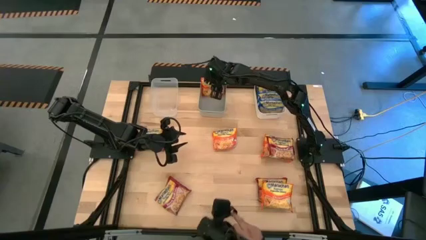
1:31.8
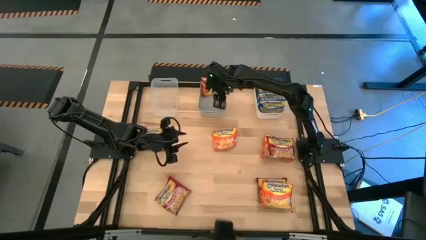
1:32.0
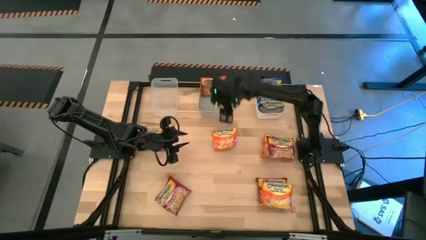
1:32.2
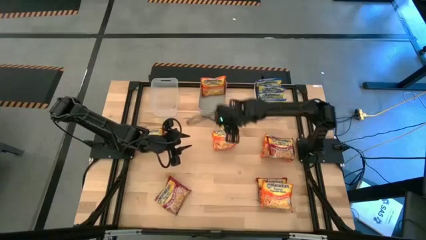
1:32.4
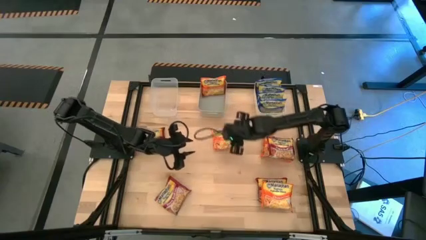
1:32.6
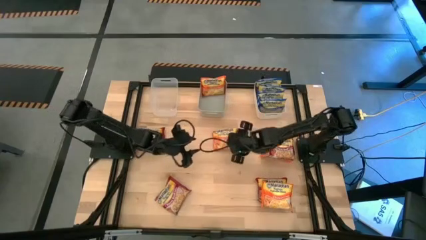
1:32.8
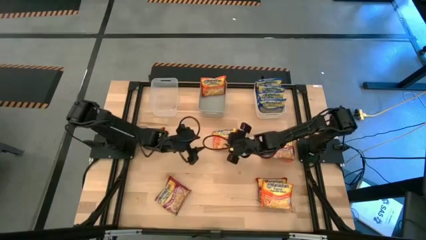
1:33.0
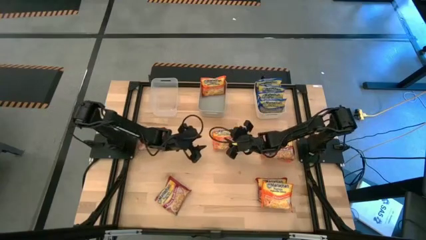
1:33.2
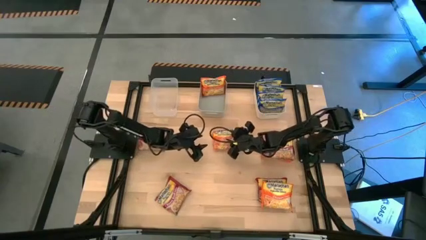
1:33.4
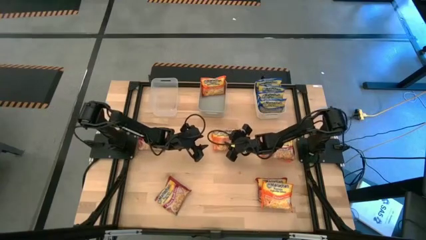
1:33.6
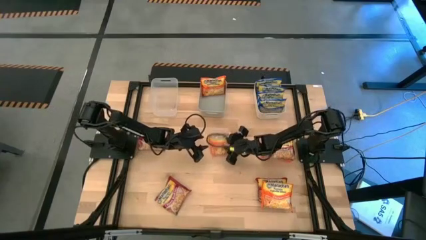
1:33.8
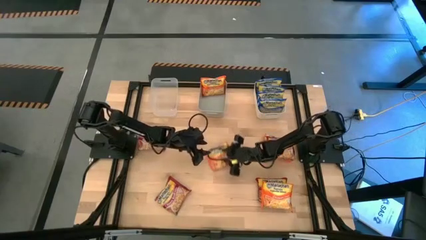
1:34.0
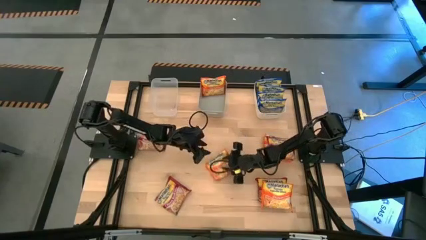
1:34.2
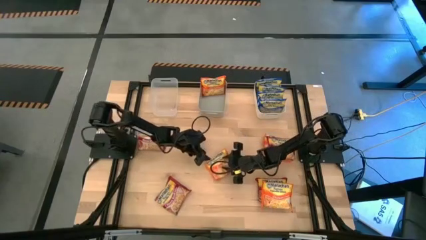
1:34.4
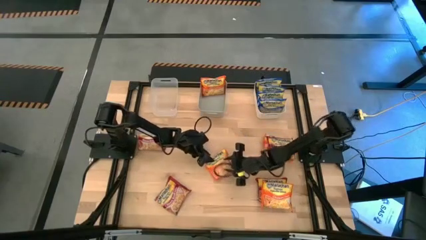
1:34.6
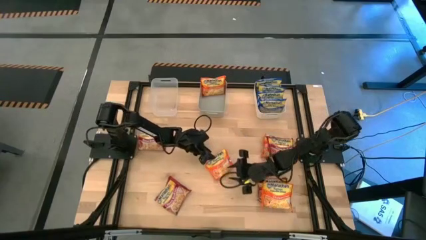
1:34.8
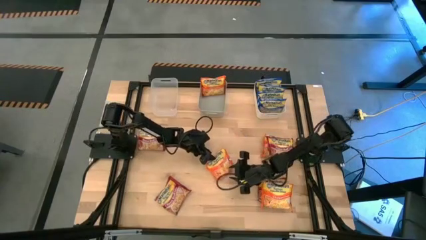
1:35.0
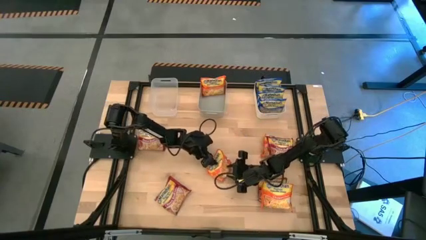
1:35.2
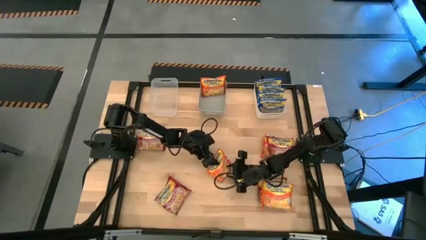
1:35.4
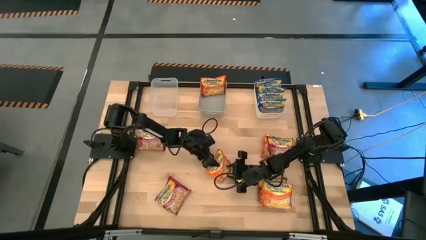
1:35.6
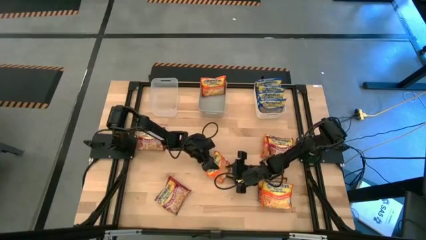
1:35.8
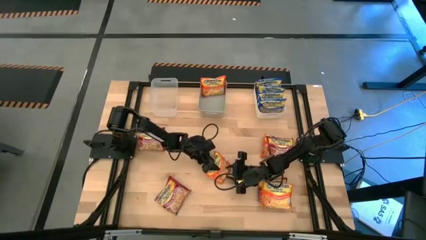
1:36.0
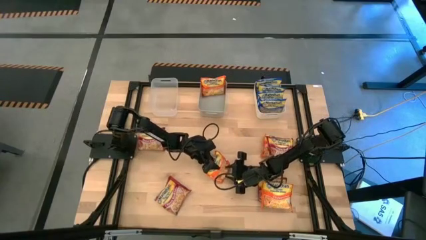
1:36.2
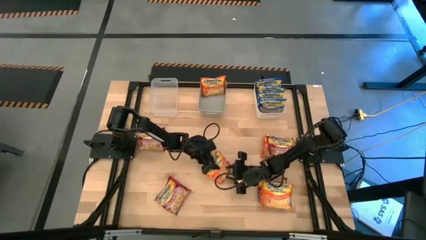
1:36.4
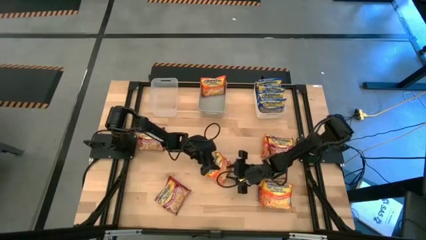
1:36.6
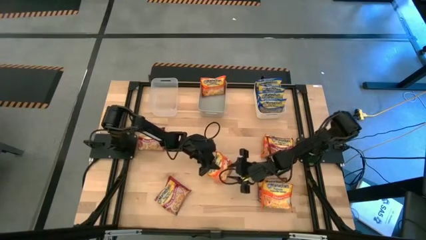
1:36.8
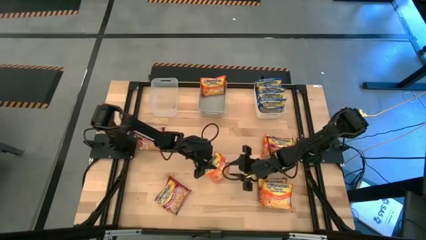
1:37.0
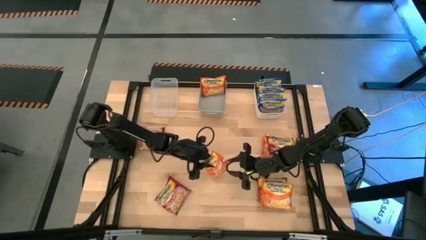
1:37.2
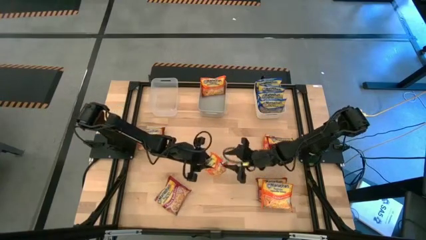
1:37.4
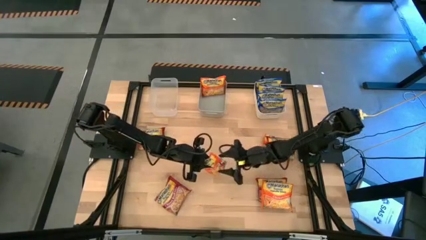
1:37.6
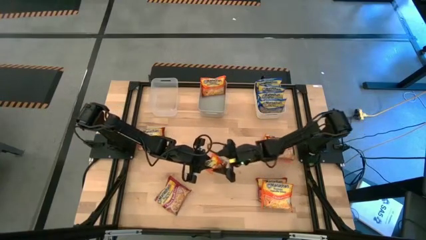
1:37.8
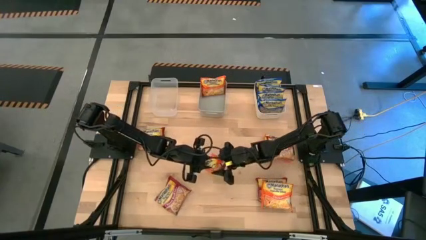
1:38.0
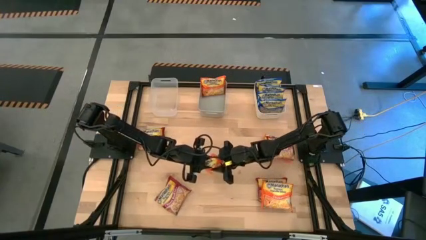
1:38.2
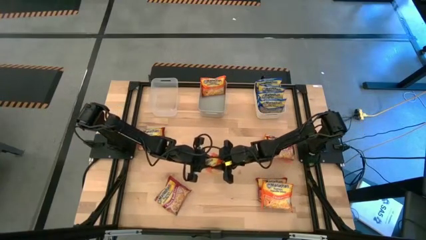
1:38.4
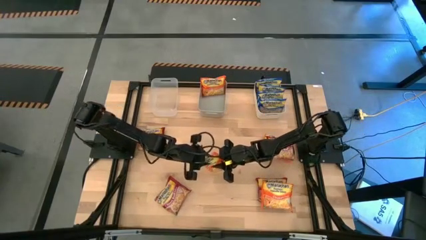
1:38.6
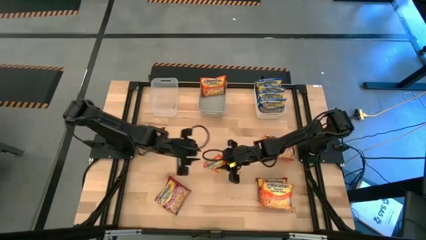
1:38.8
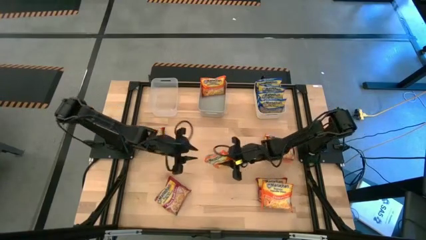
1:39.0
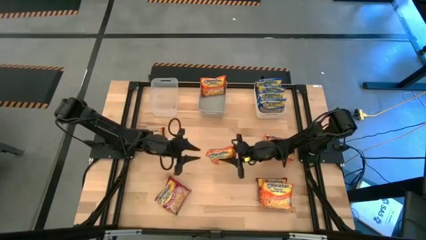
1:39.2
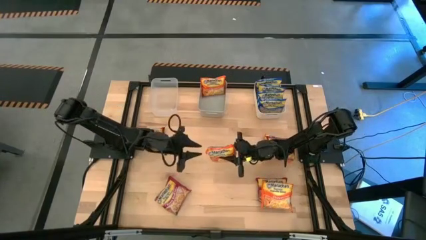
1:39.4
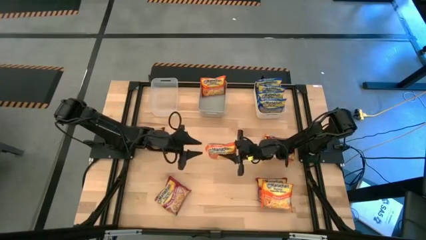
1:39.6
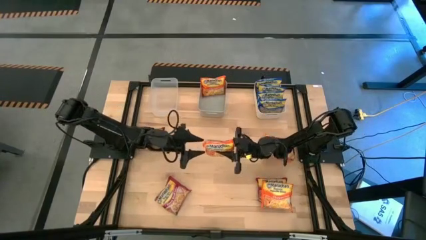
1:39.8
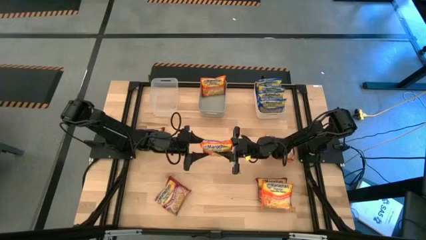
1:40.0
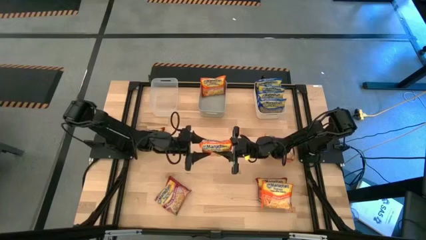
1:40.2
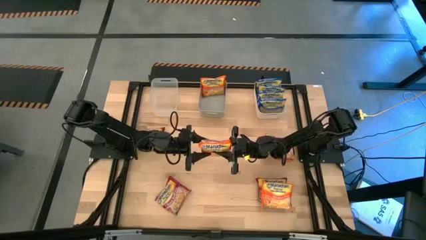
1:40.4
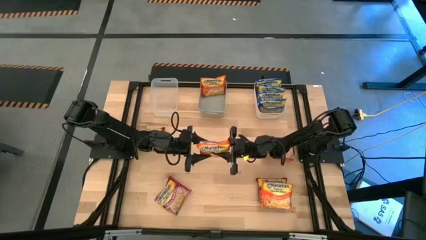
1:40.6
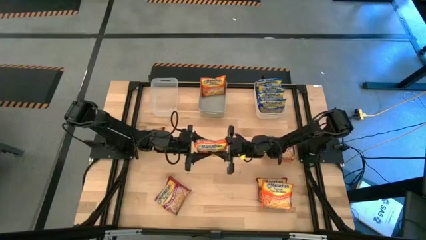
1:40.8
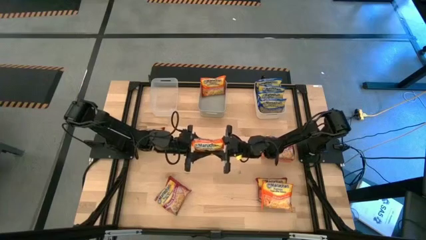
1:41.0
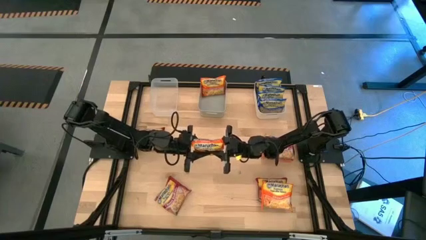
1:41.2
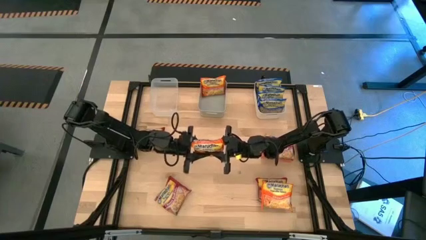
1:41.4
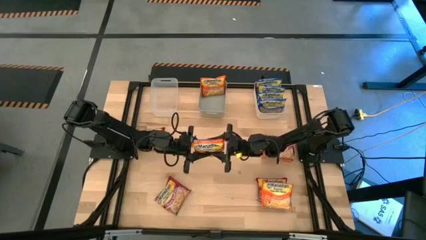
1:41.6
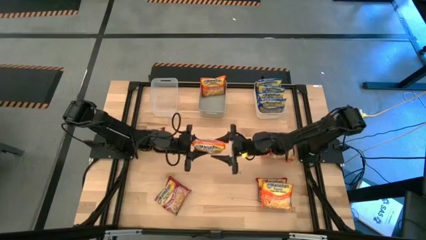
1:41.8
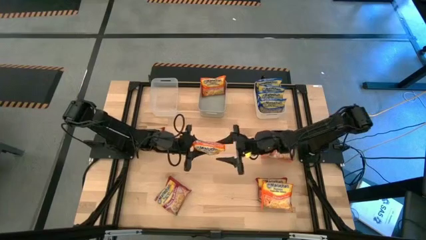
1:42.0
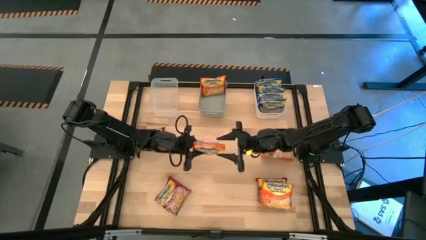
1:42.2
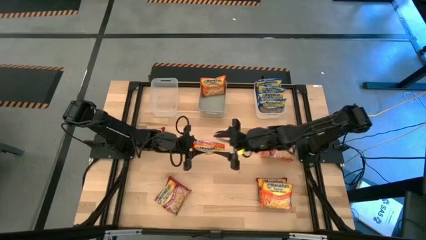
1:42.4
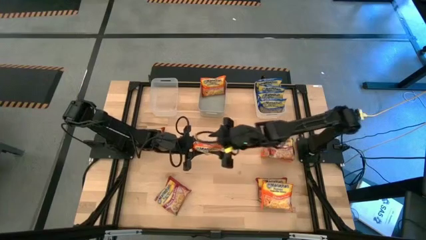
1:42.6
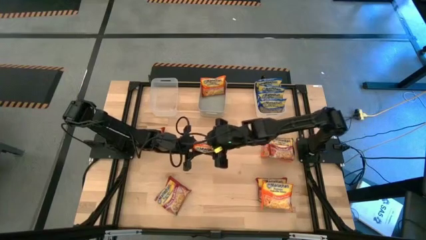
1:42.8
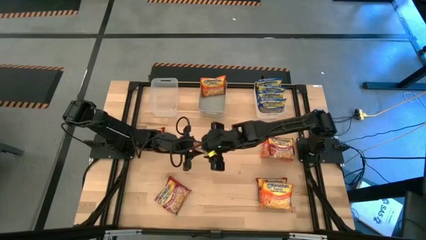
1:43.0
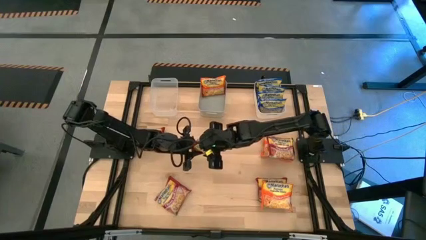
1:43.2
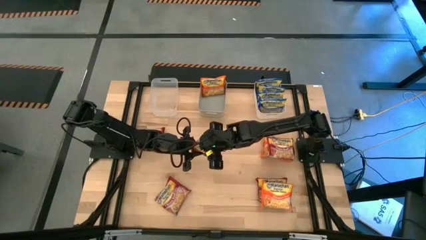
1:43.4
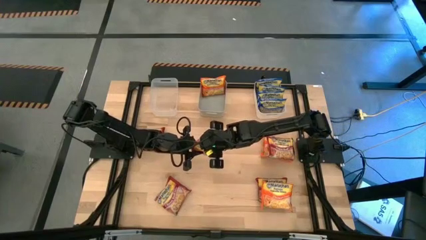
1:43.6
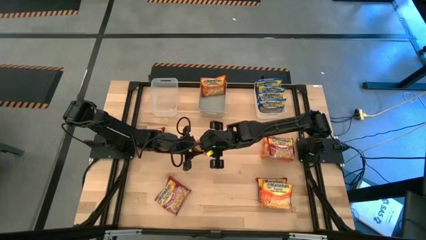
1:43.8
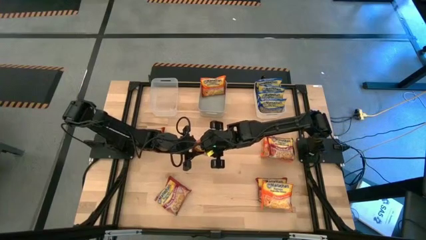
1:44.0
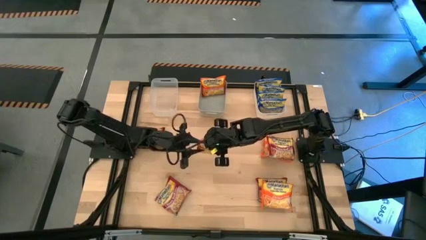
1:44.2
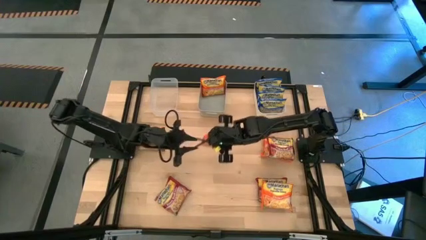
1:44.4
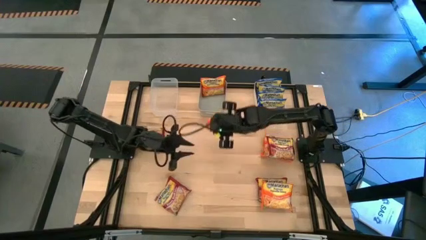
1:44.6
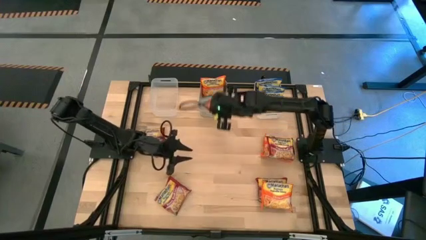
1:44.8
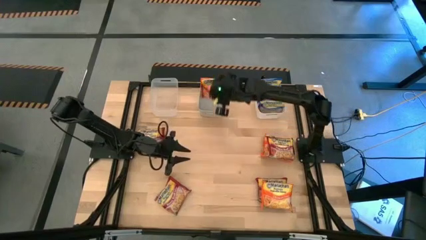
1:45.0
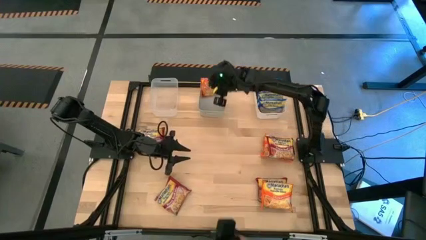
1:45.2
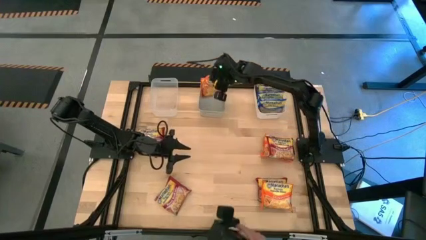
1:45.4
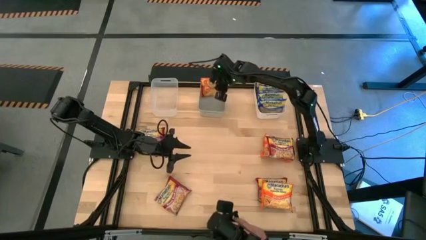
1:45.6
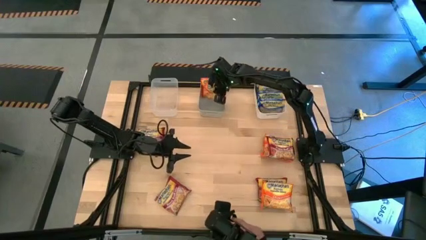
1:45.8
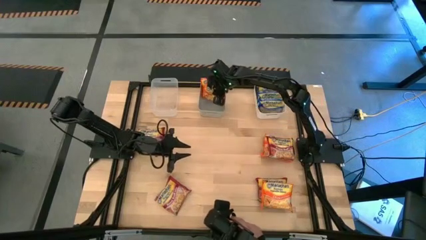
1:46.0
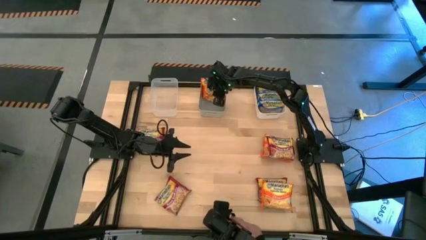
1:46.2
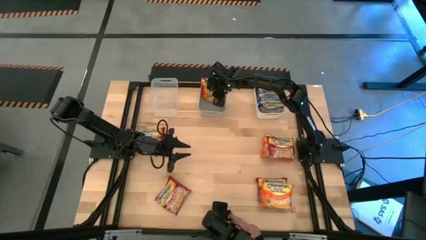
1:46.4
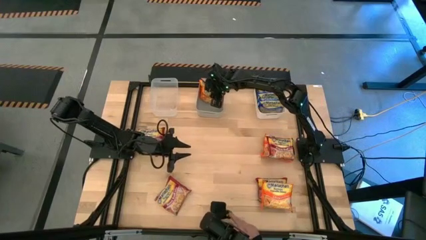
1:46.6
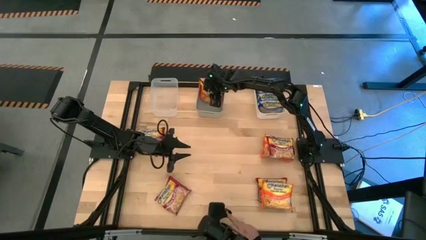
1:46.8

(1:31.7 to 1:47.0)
Task: Sort Maruchan noodles
Put the orange noodle pack into the gray bin

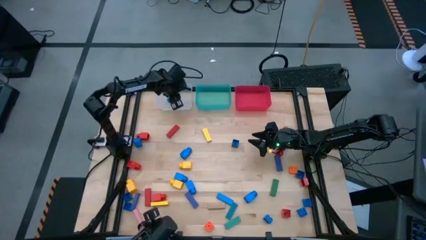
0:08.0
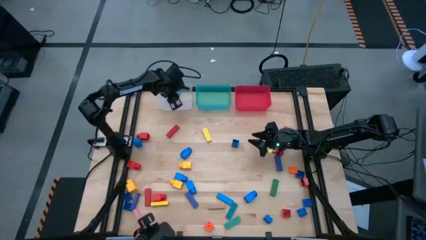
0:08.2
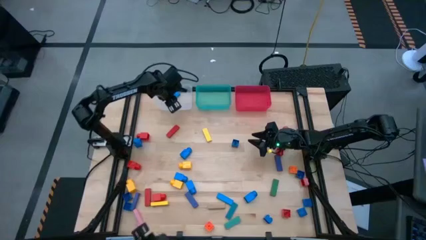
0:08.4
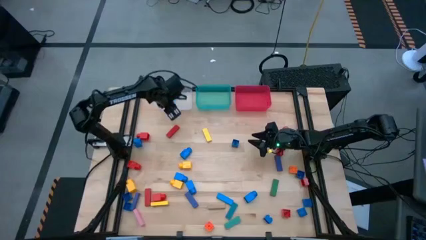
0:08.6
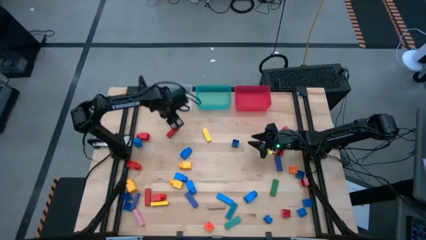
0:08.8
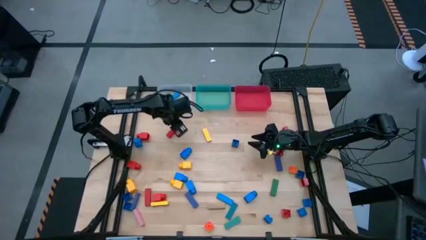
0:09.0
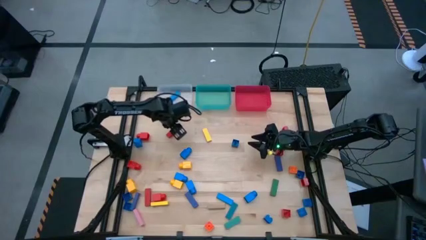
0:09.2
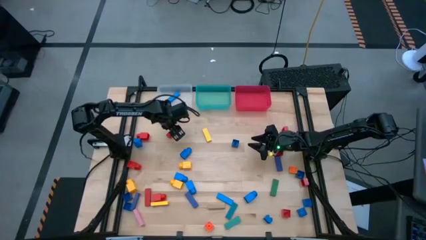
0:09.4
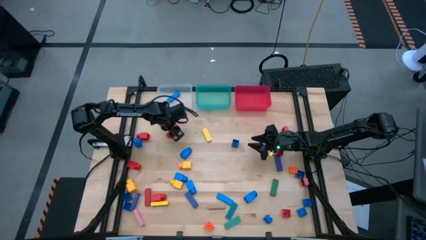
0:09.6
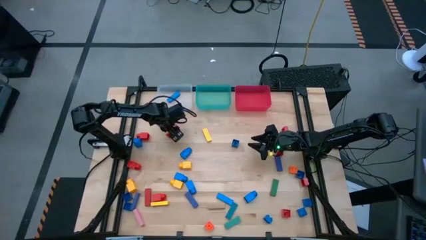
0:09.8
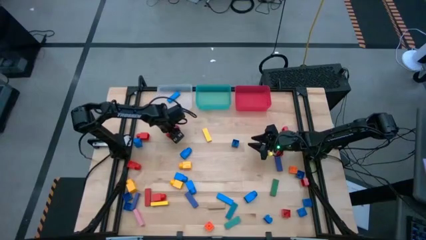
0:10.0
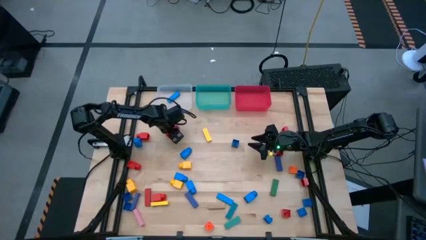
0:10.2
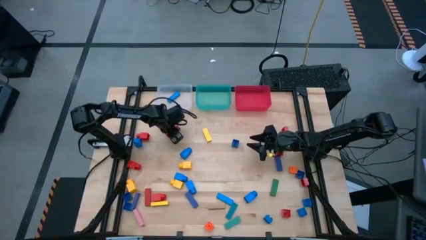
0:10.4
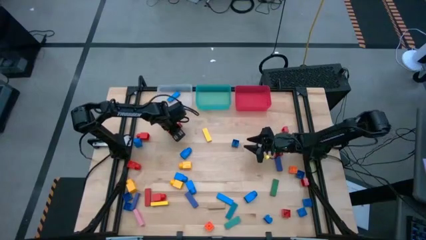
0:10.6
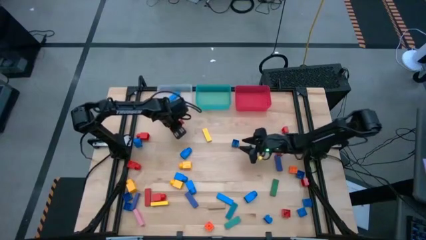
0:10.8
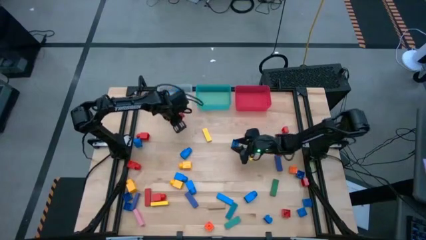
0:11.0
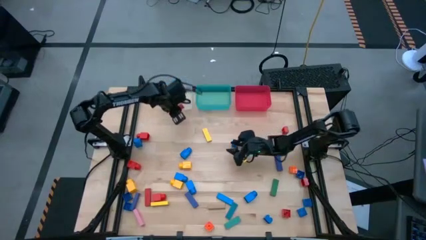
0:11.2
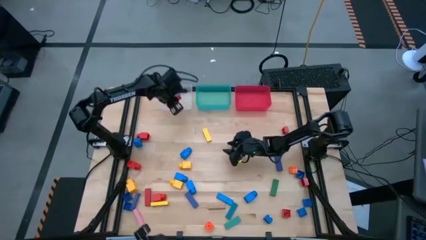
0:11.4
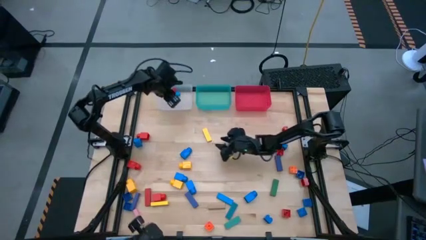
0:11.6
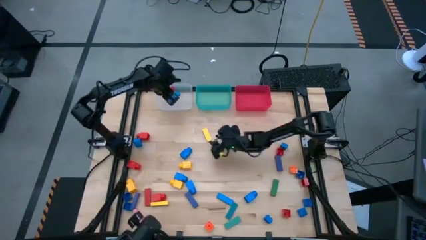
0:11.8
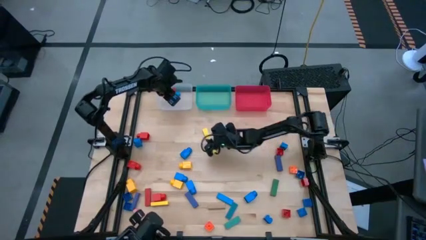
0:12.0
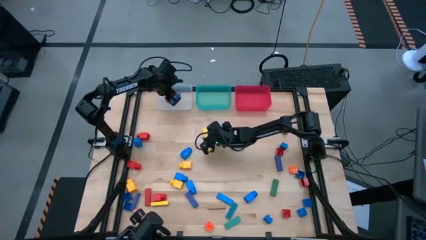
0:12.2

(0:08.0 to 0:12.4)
Task: Sort blocks by size
Put the red block into the transparent bin
